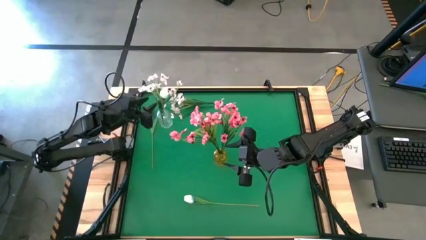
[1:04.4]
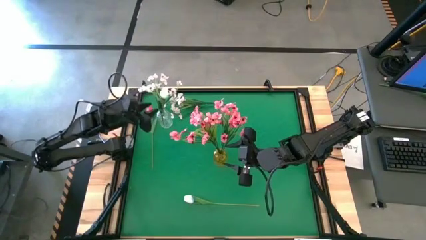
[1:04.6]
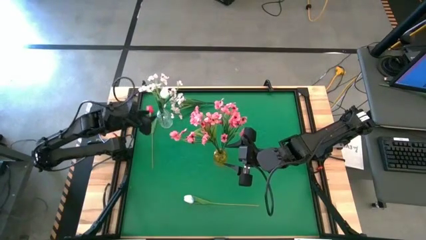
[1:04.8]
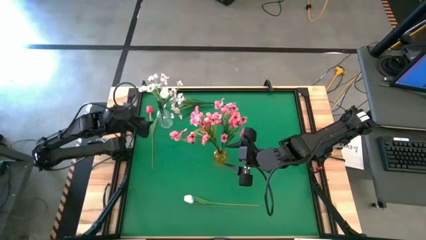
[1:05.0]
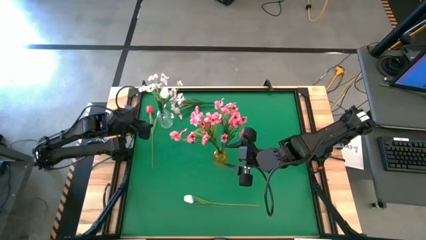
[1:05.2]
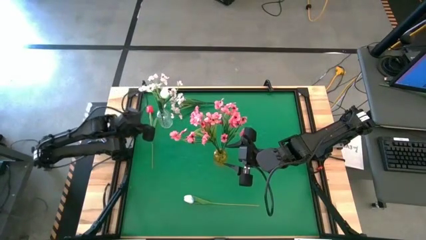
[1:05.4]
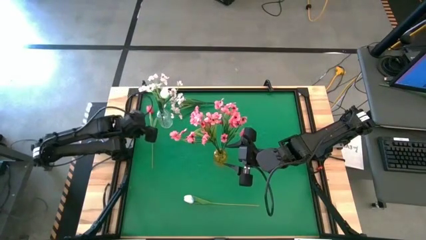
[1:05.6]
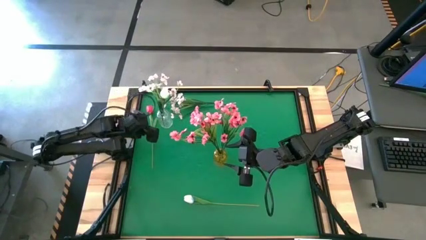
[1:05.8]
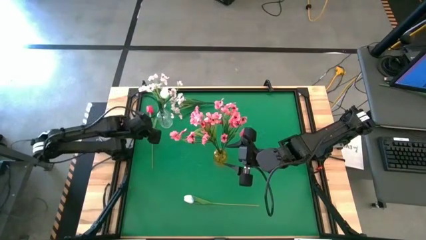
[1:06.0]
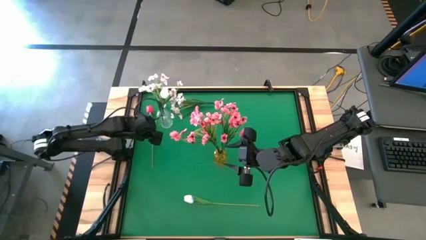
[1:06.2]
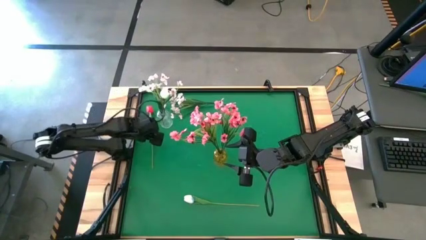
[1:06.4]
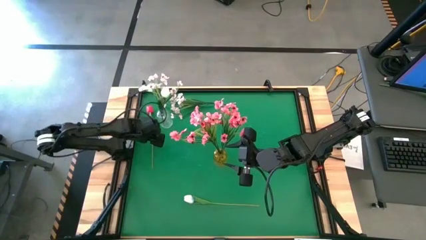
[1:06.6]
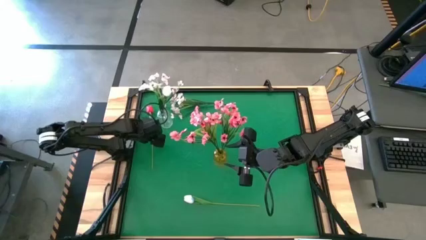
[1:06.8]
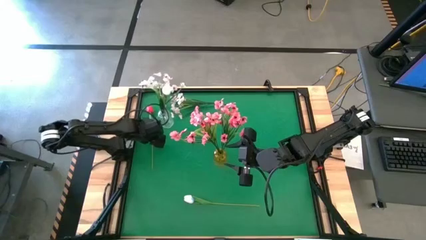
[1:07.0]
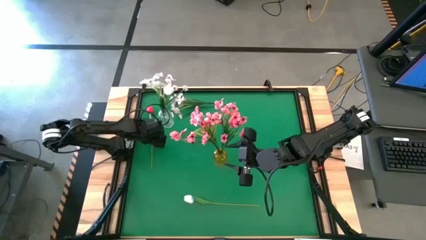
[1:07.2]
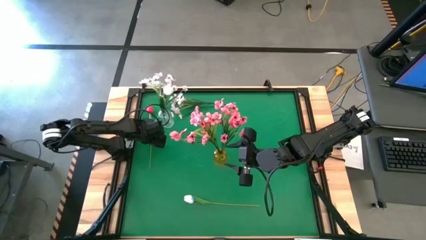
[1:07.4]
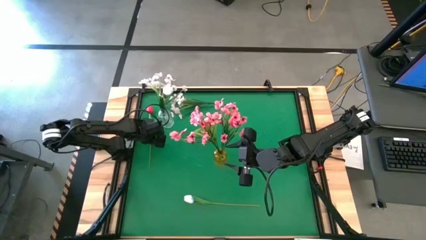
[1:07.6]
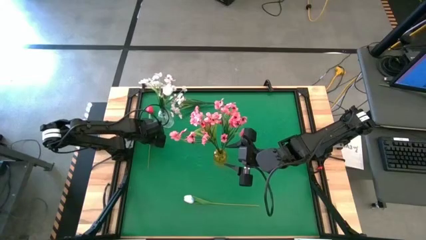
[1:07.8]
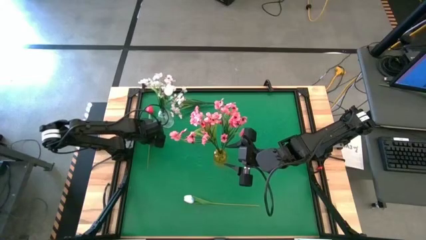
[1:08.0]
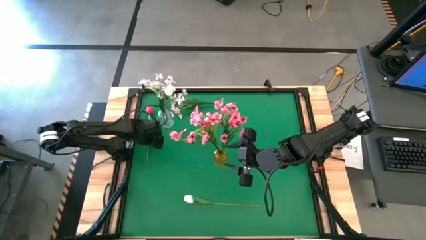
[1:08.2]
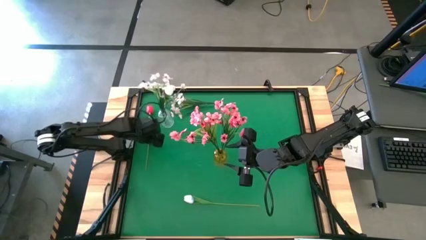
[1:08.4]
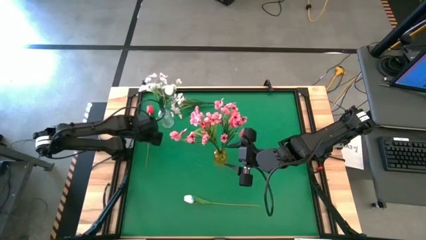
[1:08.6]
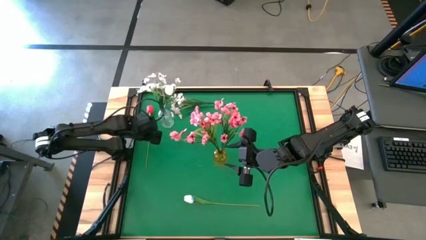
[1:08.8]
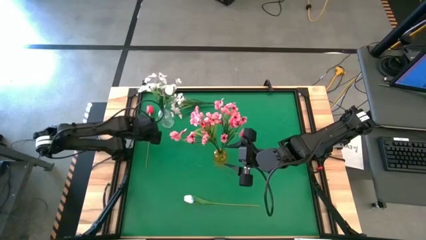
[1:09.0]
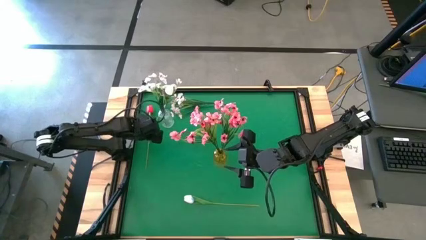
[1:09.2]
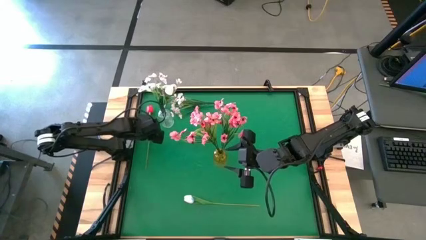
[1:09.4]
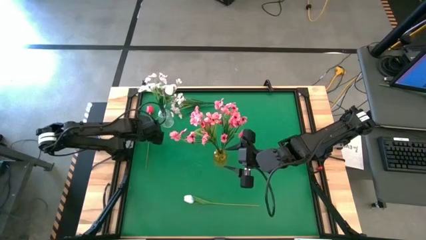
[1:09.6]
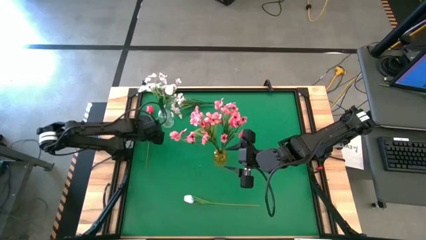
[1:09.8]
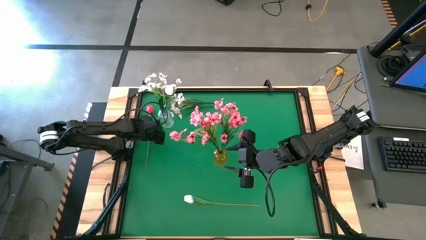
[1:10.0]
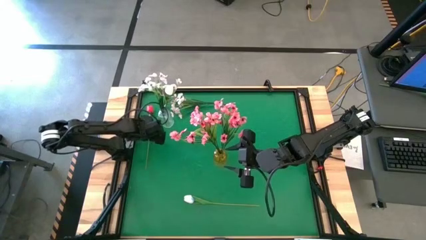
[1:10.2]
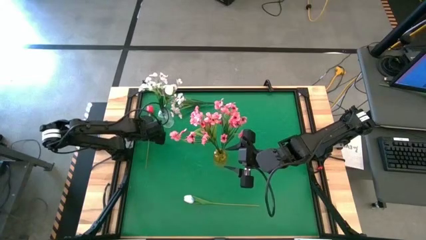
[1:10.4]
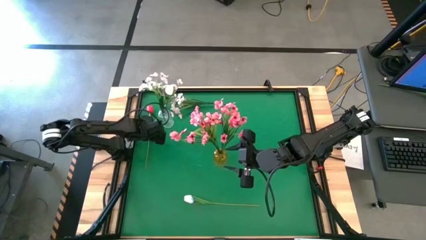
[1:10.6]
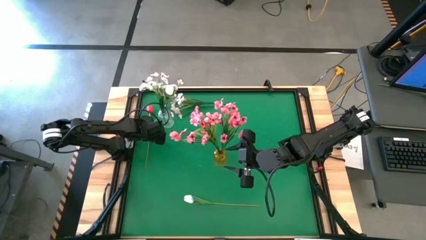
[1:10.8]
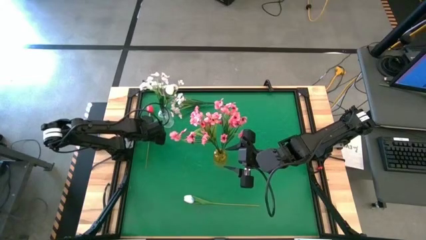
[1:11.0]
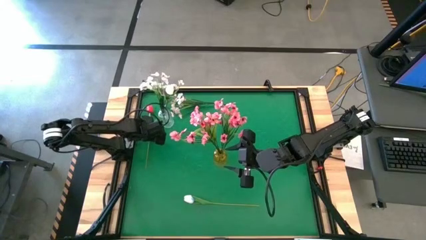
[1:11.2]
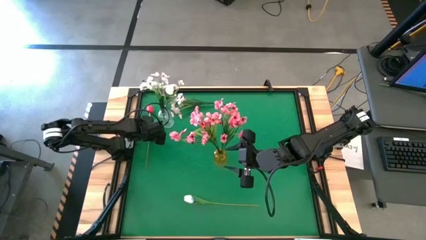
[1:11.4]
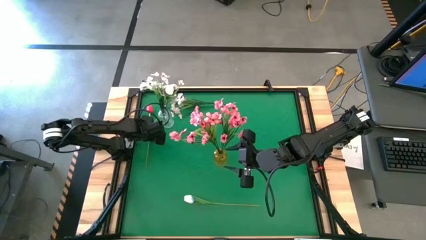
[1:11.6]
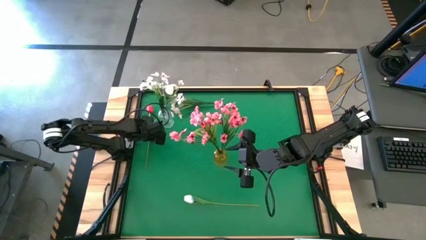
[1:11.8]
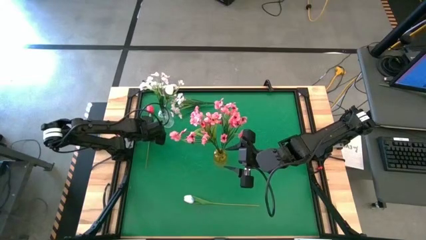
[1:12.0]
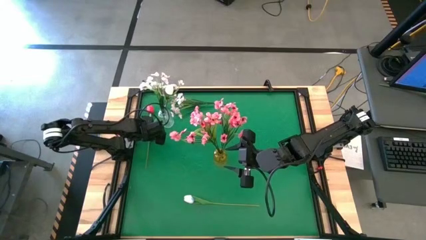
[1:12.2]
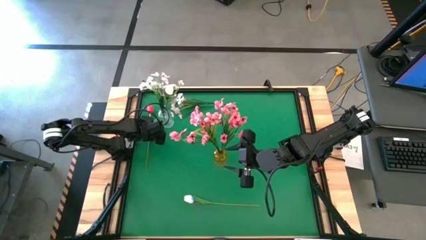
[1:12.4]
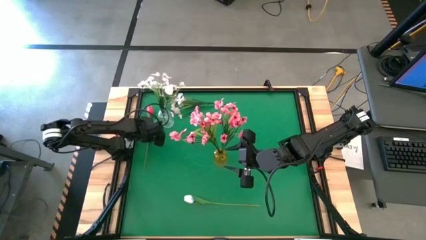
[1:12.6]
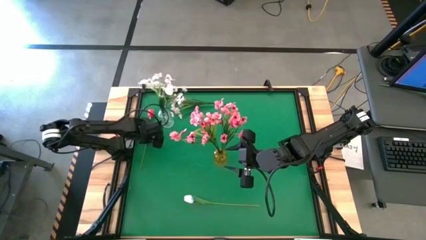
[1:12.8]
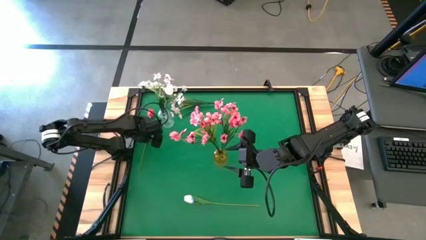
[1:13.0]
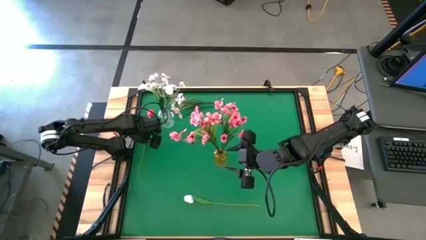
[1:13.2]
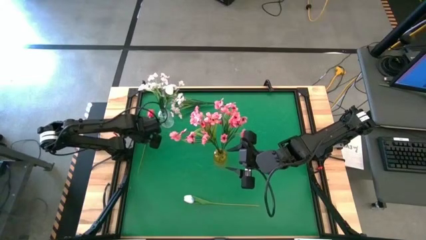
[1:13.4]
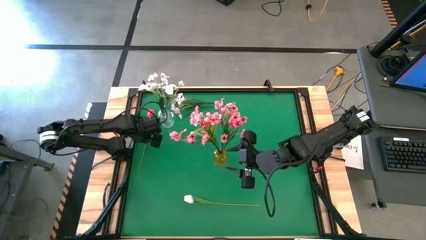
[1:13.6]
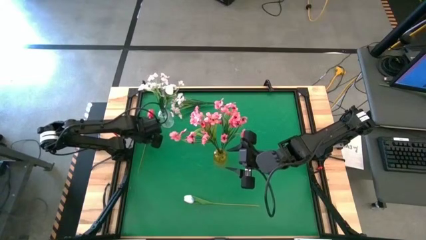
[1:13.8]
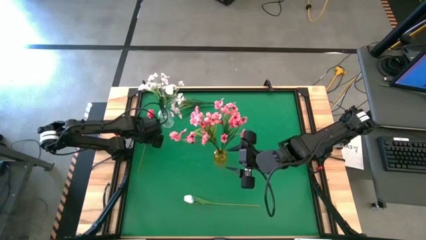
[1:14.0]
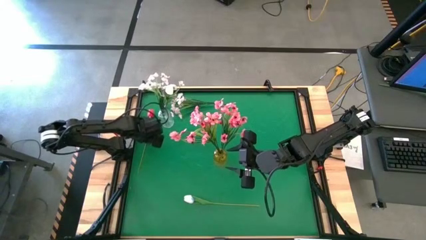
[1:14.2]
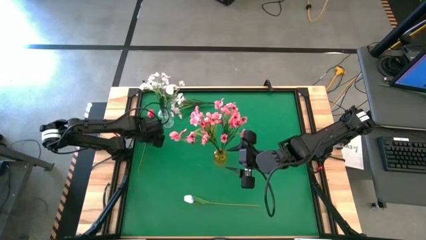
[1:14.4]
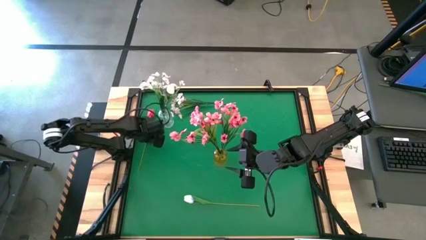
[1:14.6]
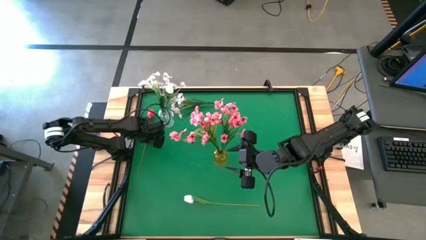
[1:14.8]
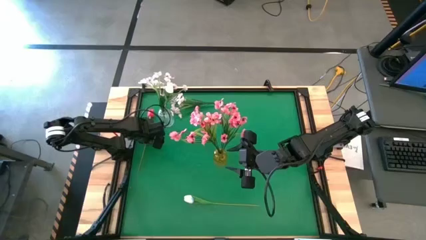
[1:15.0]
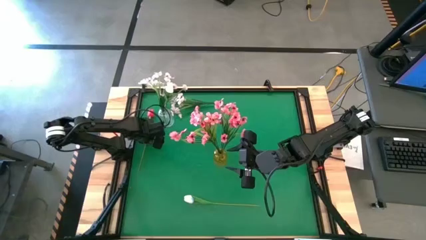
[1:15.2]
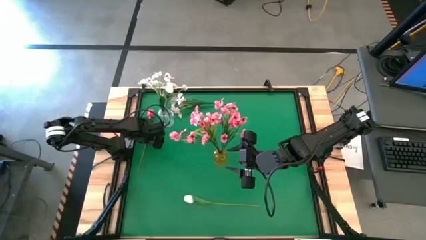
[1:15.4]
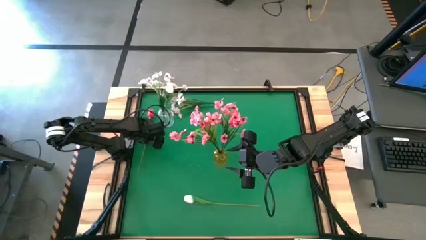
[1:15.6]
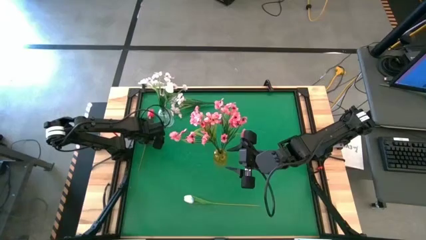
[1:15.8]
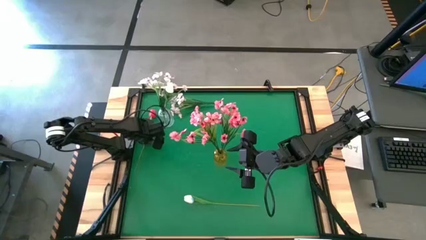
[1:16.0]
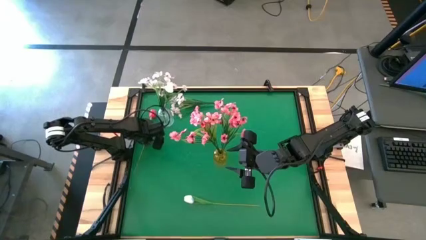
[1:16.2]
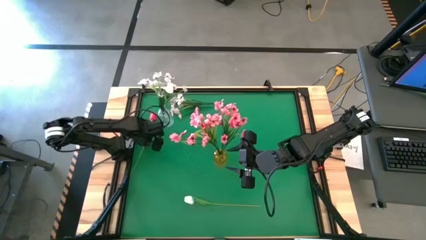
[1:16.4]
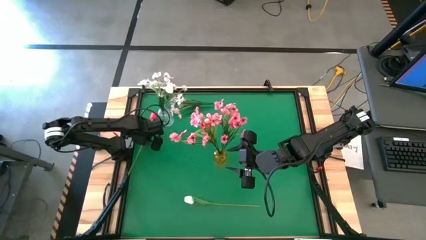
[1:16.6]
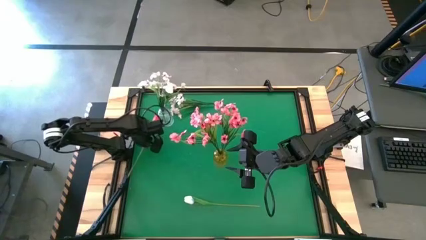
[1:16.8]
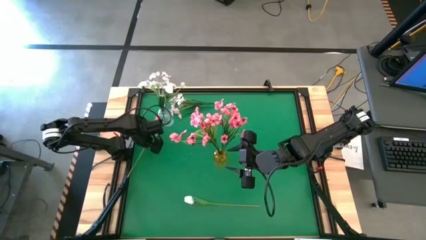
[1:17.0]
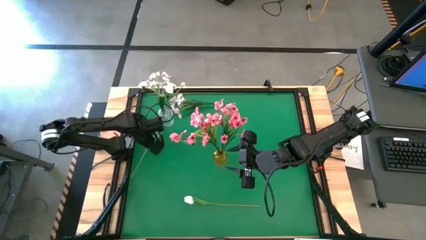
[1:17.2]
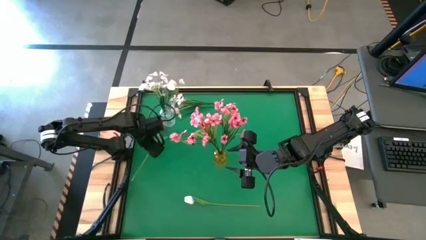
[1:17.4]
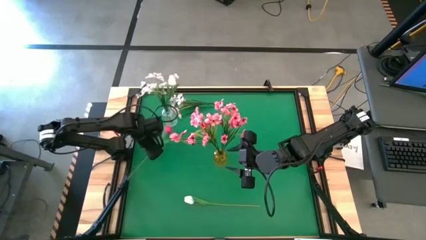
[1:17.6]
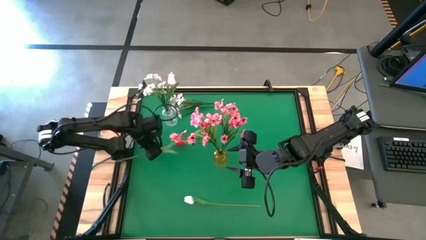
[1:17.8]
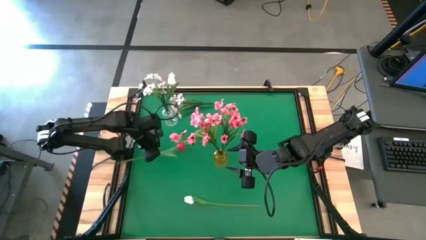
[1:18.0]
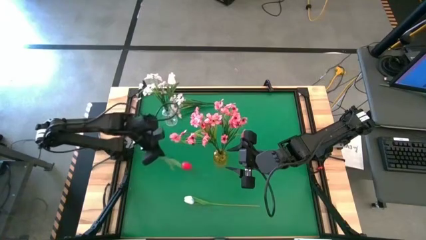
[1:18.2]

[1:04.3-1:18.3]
Task: Sort flowers into vase by color
Put the red tulip into the yellow vase

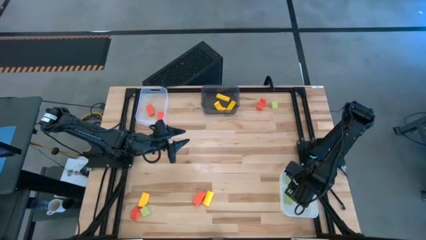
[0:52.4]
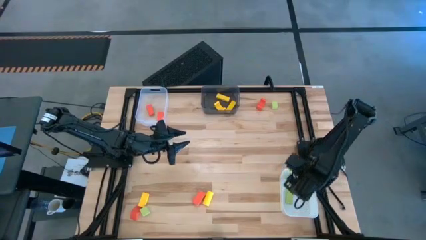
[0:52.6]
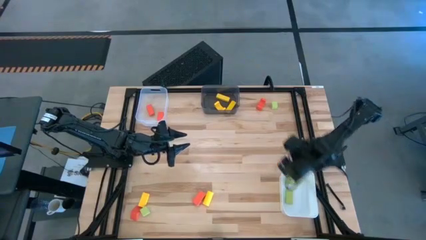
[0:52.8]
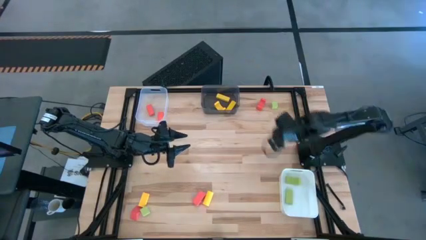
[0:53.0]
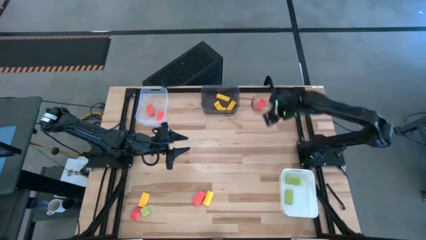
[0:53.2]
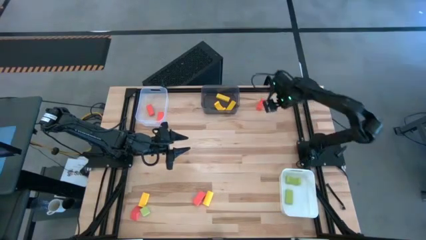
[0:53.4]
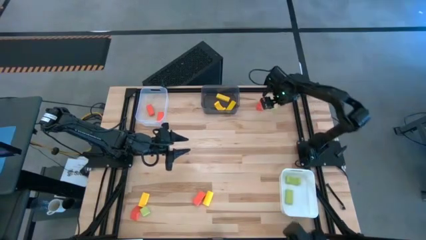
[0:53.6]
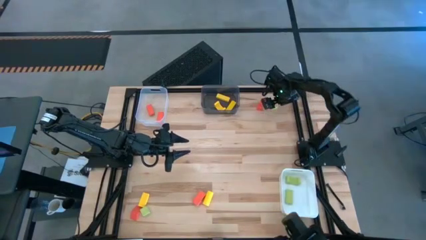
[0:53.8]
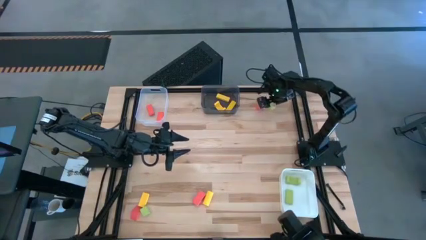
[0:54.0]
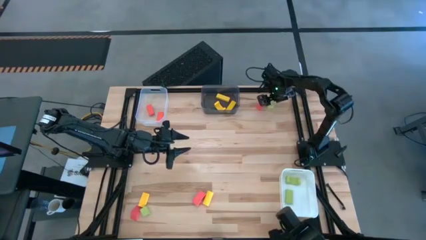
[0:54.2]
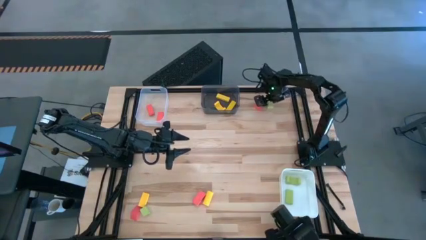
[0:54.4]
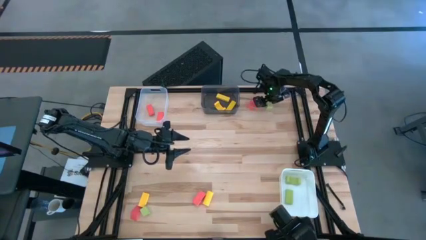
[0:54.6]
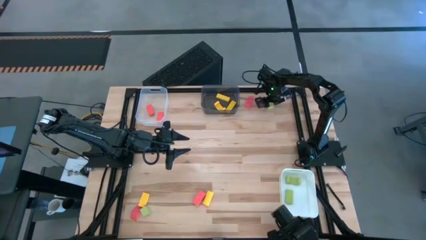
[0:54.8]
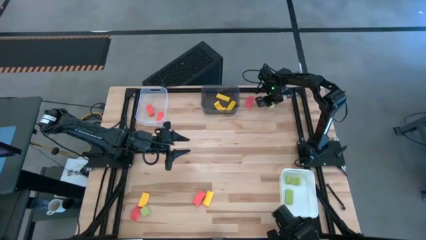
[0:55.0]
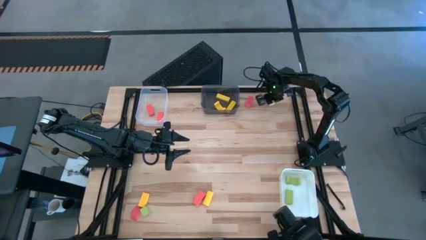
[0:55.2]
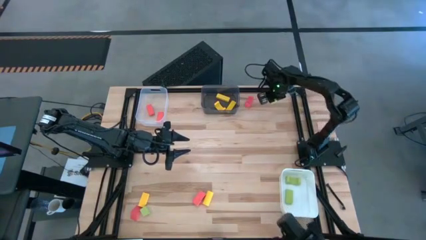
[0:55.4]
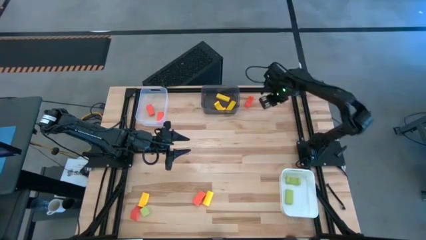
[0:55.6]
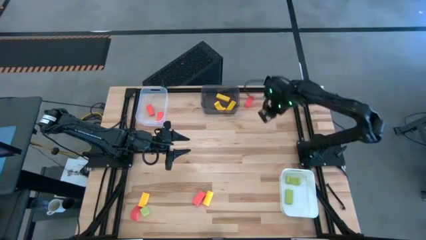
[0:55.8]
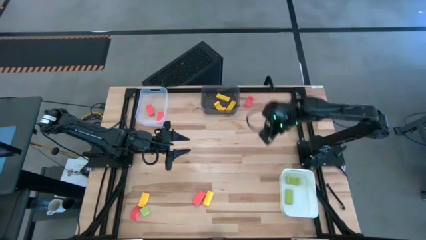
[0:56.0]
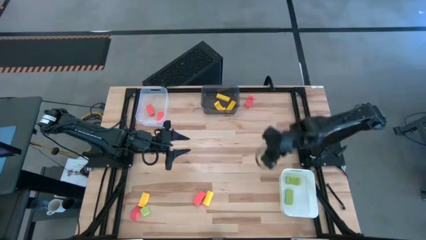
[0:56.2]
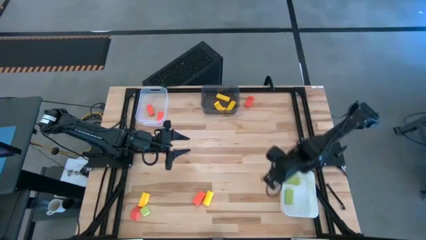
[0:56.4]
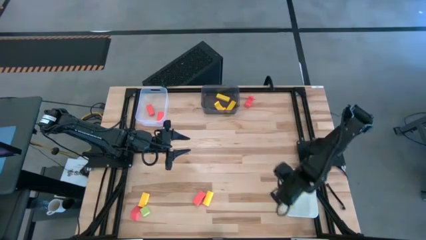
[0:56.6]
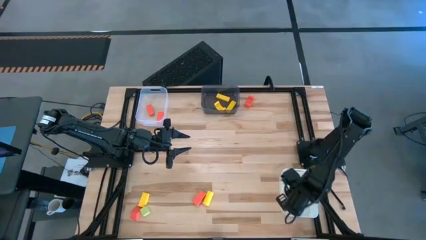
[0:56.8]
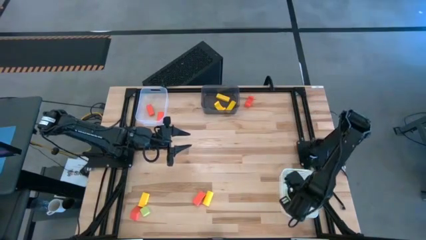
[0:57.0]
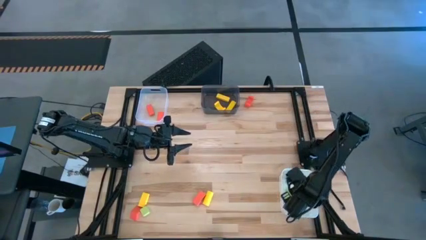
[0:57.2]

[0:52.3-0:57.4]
Task: Sort & place blocks by color
Put the green block into the white bin
